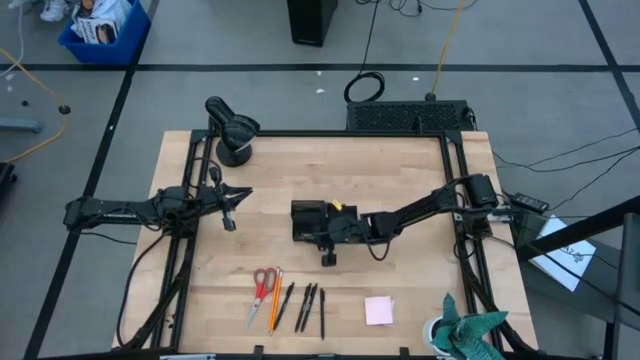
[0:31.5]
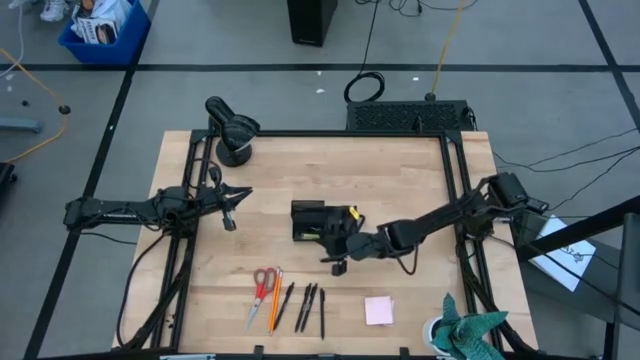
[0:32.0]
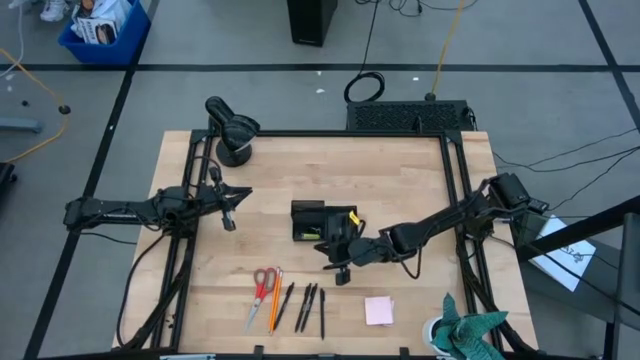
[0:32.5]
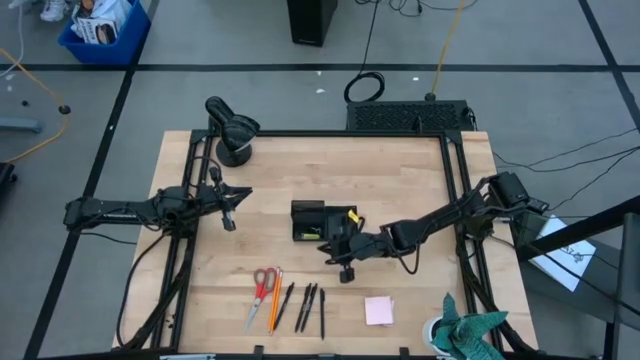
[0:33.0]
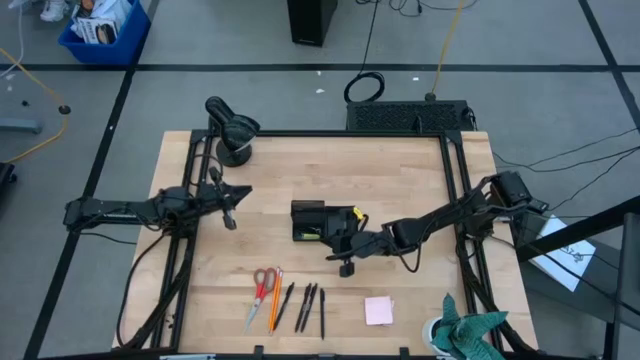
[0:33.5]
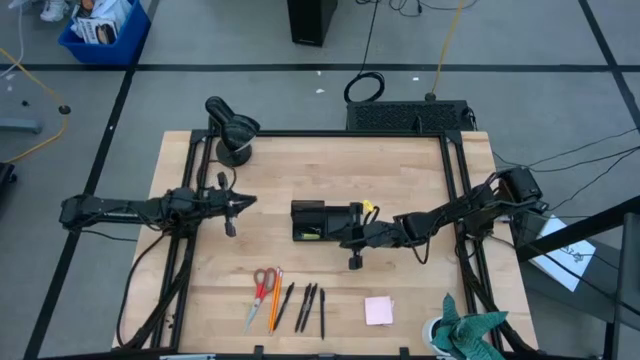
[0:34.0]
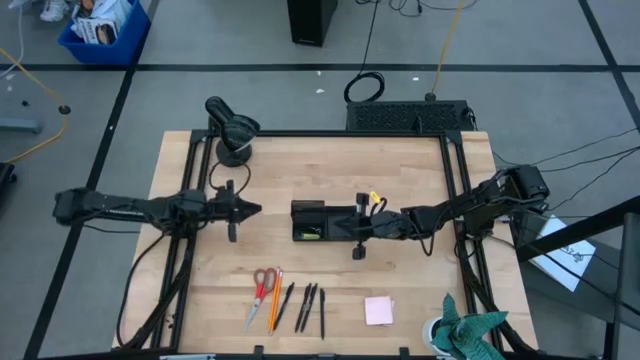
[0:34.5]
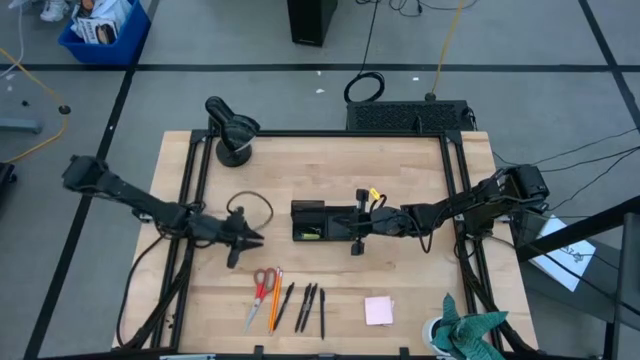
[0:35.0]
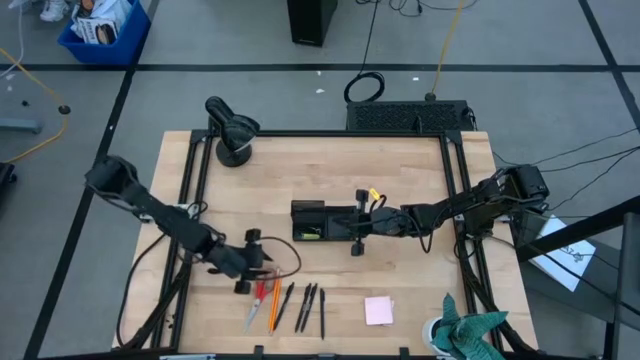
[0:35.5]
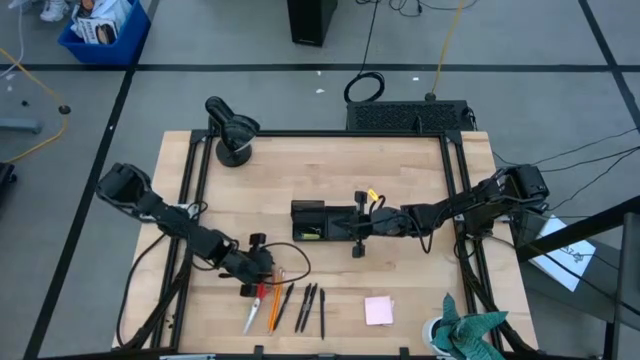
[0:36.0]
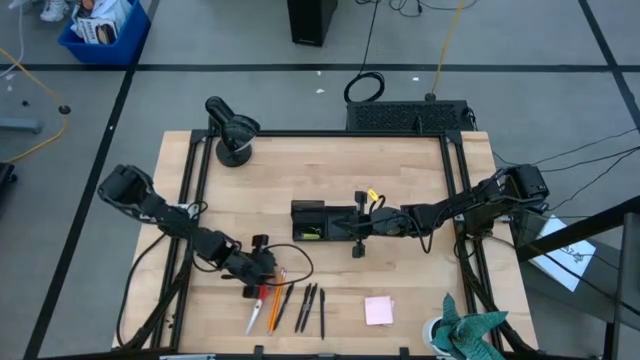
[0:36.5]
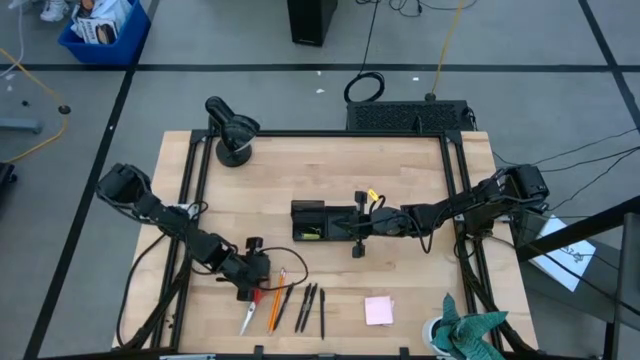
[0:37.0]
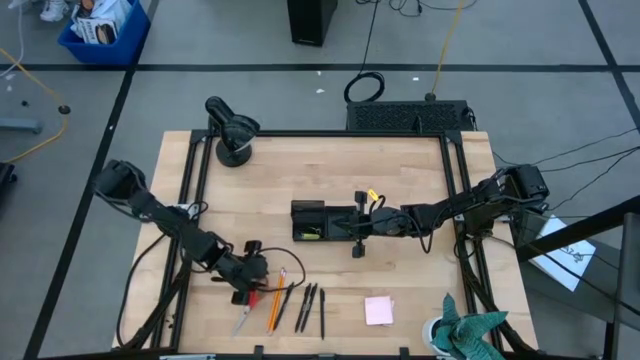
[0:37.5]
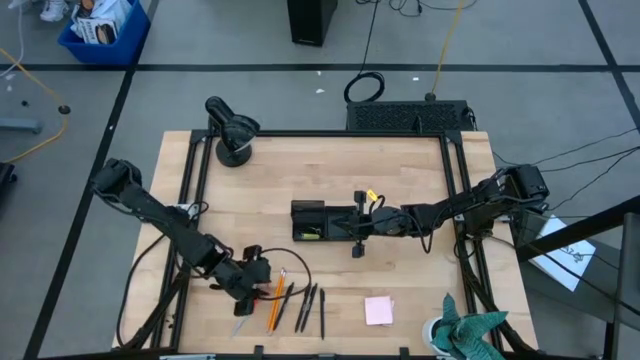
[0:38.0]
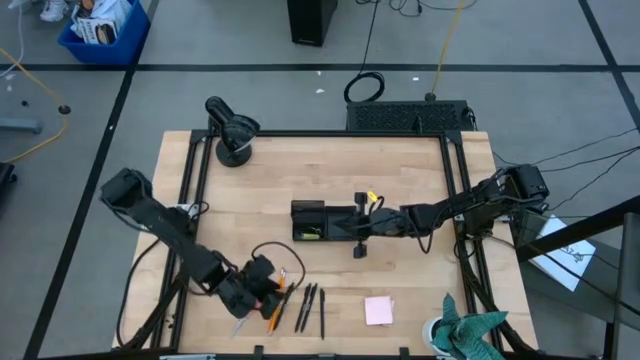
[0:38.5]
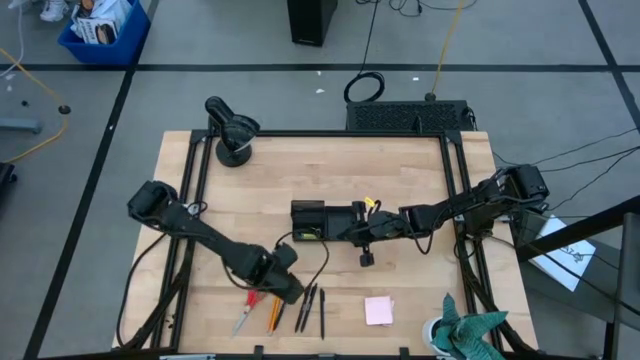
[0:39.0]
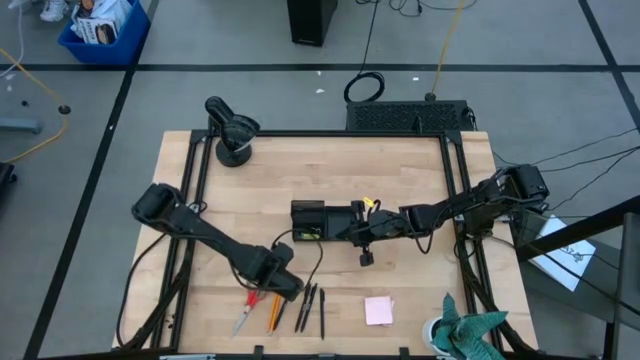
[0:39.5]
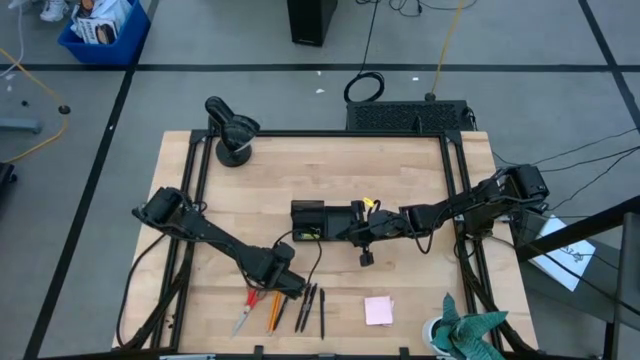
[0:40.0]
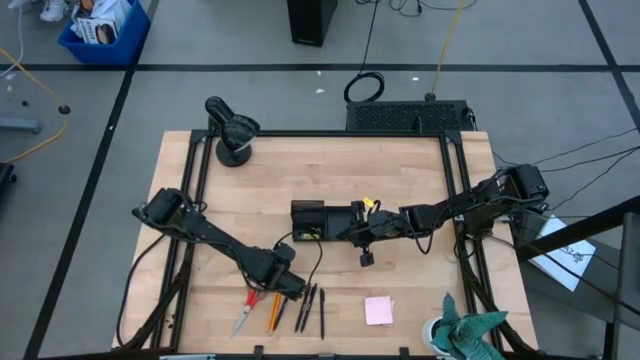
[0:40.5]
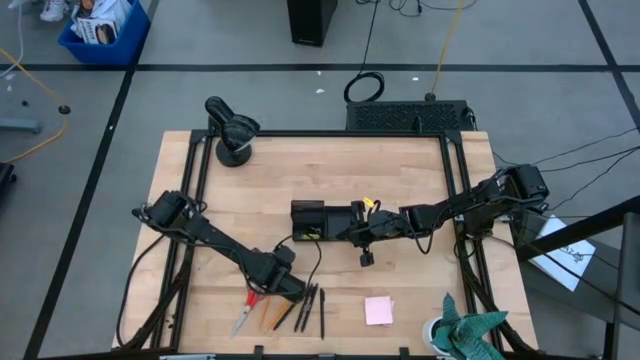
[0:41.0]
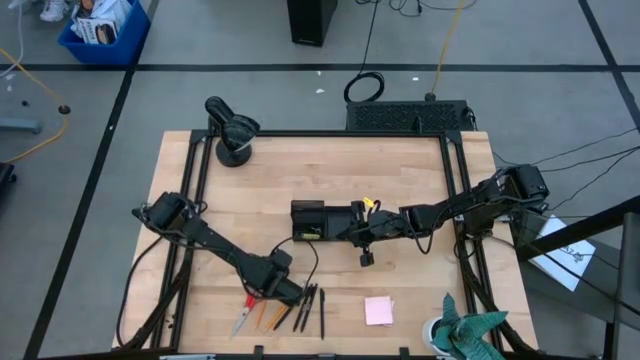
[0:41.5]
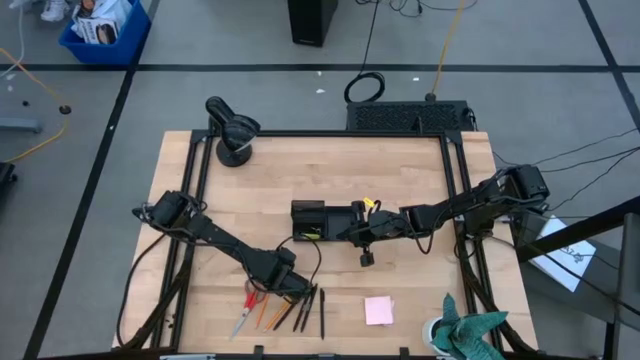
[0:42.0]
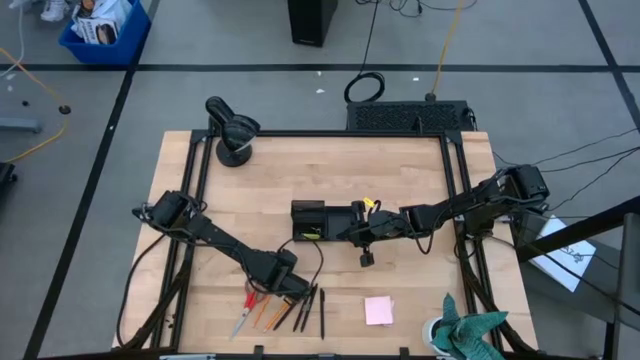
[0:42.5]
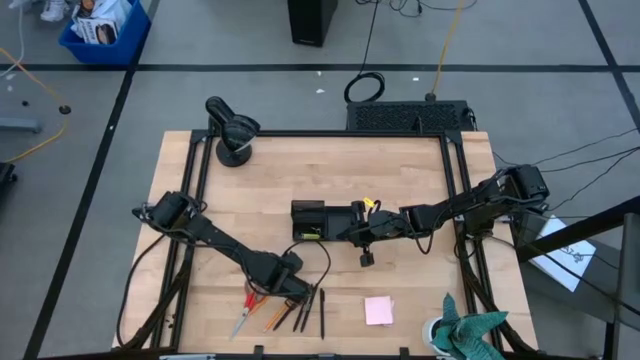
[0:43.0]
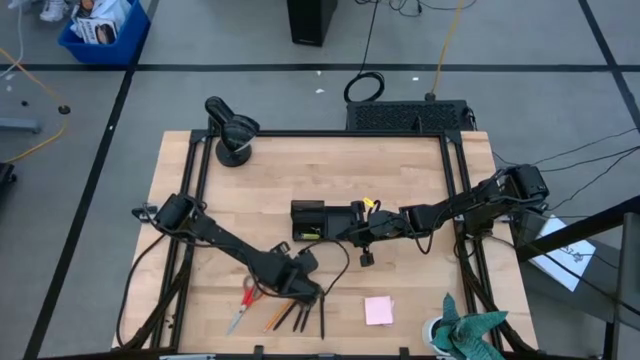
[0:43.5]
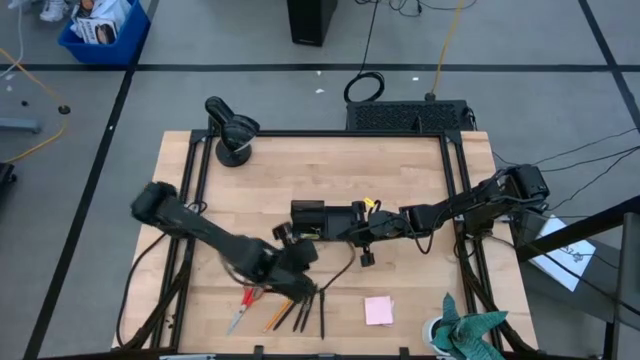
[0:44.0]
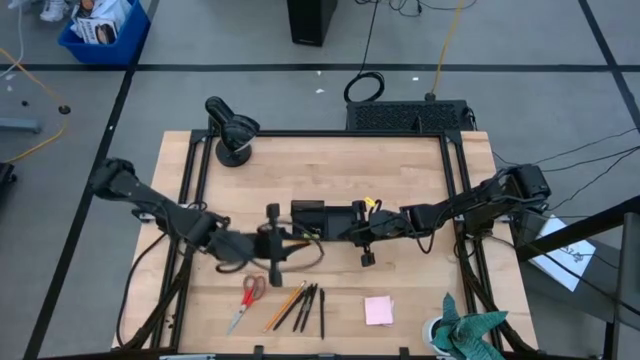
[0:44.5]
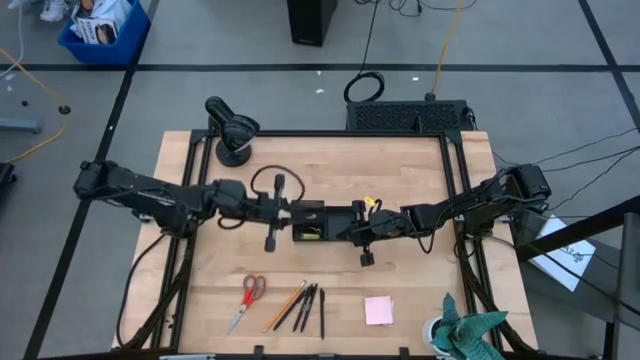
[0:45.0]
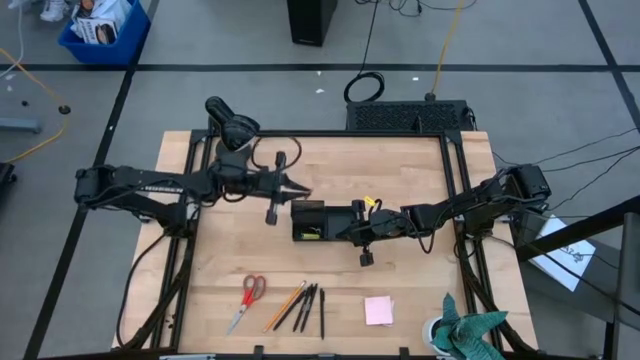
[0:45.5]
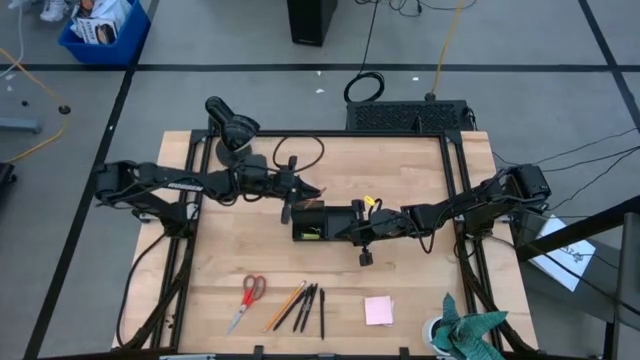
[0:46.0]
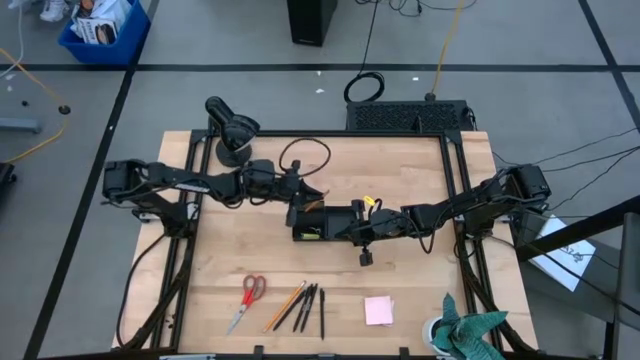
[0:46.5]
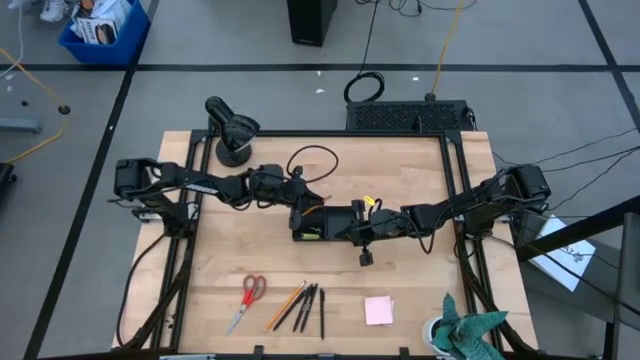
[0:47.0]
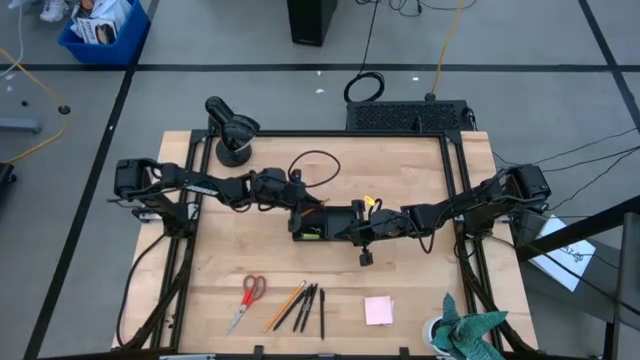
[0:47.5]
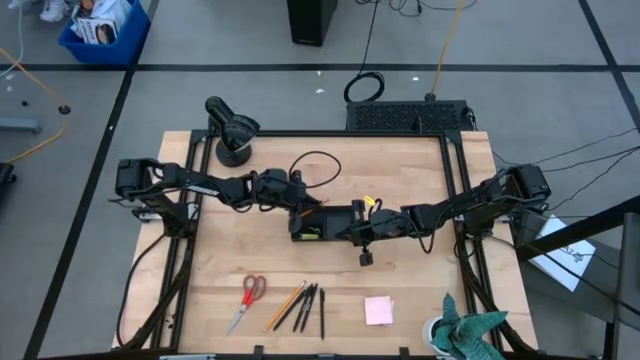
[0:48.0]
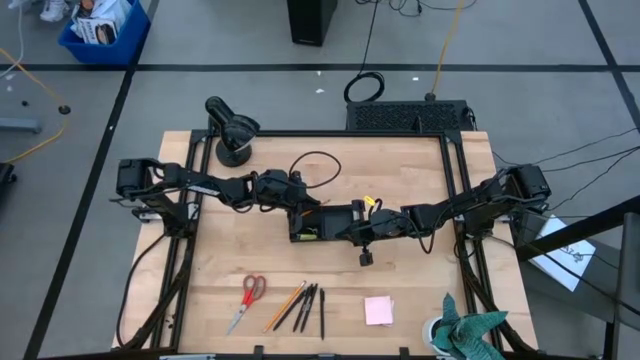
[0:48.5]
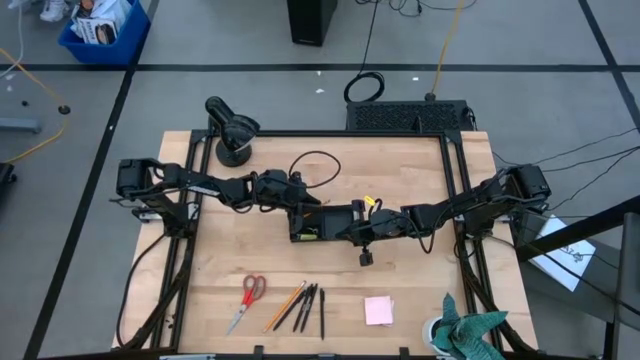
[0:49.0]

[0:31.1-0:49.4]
Task: Pick and place office supplies into organizer
Put the yellow pencil into the black desk organizer
